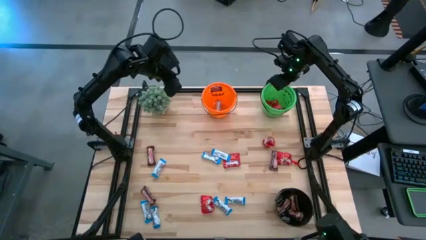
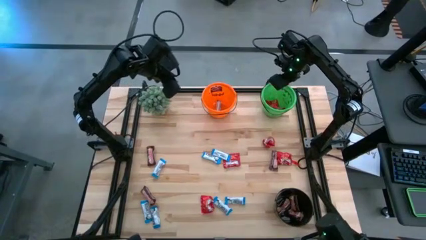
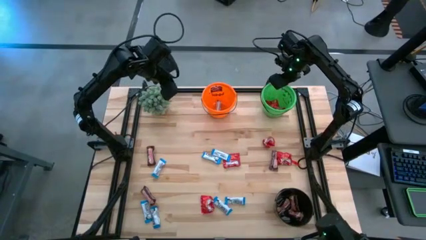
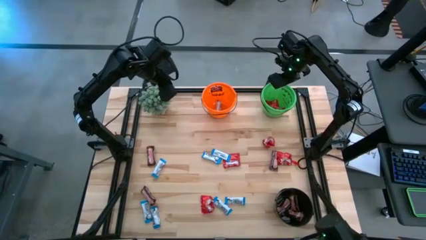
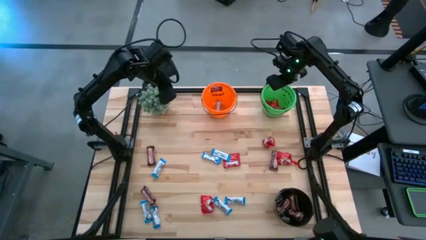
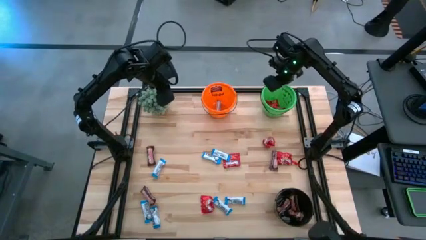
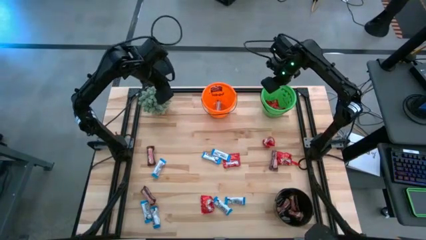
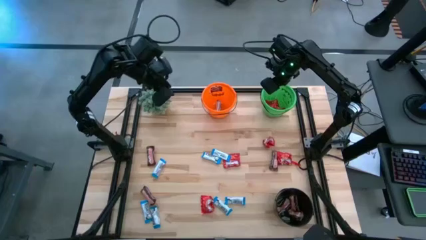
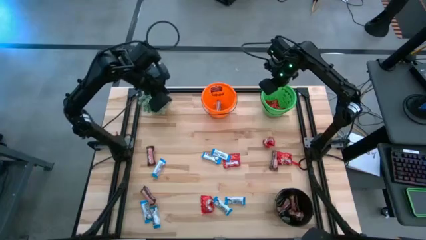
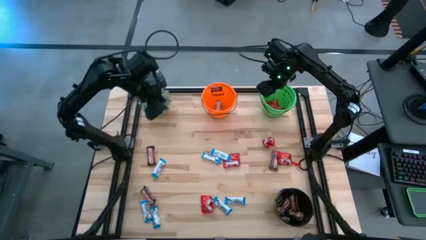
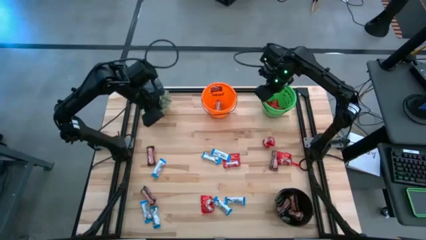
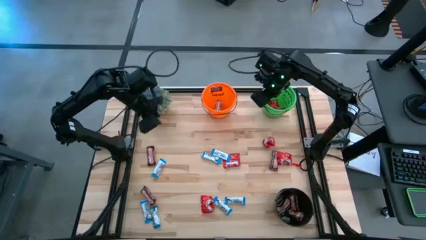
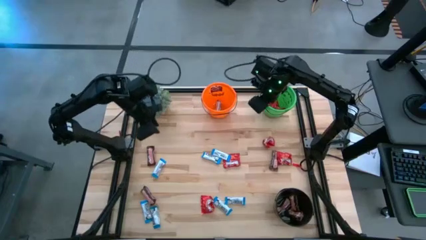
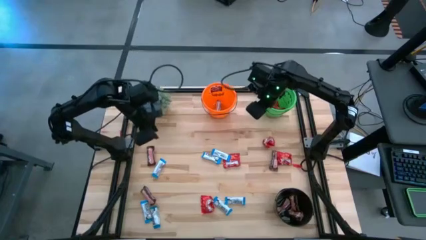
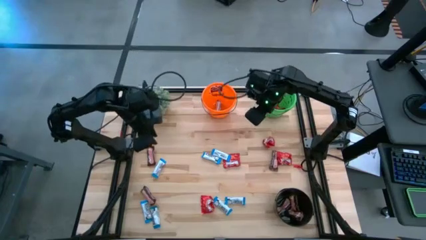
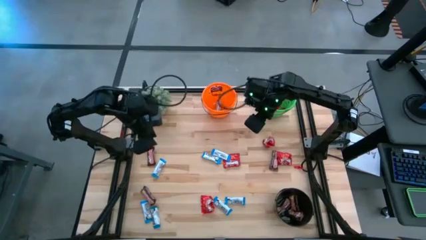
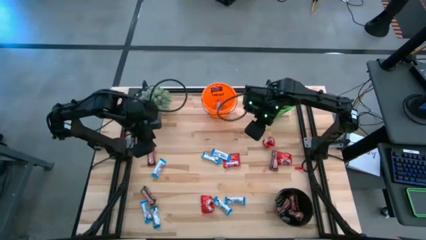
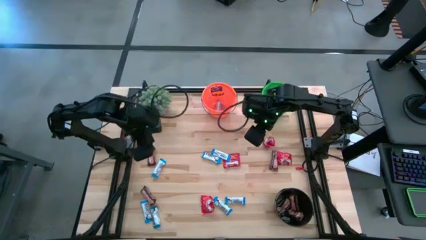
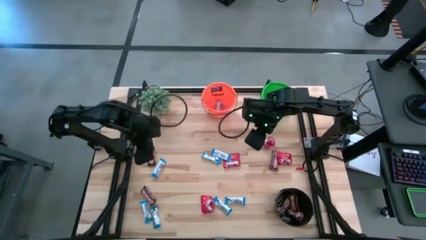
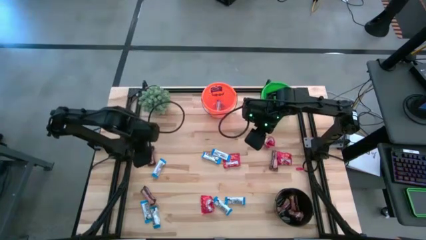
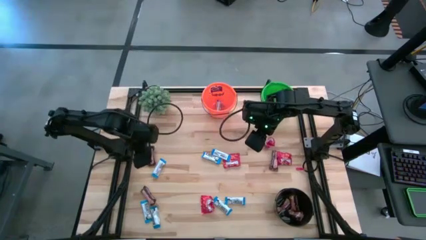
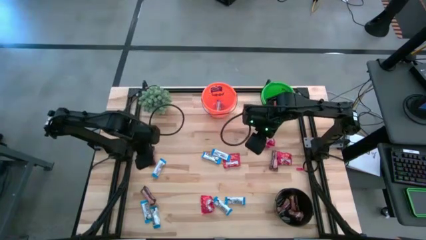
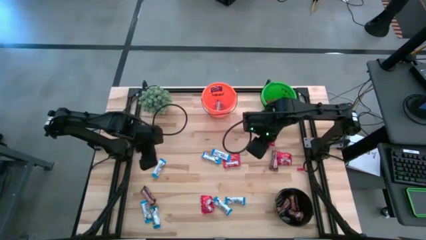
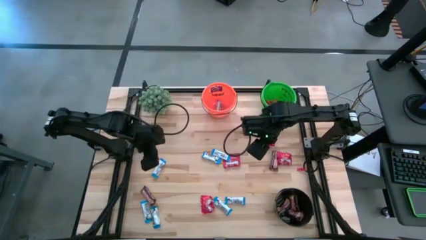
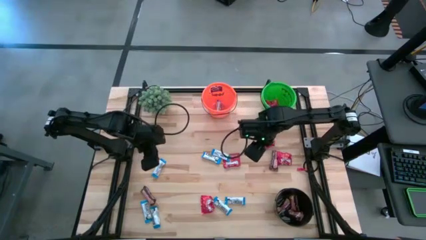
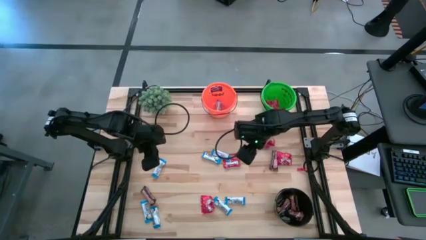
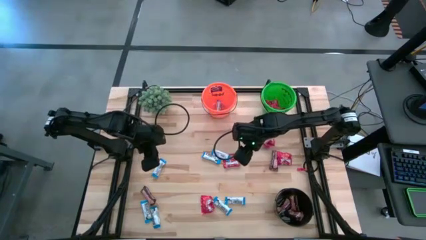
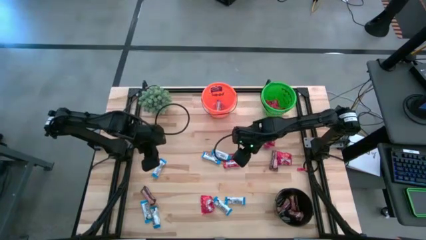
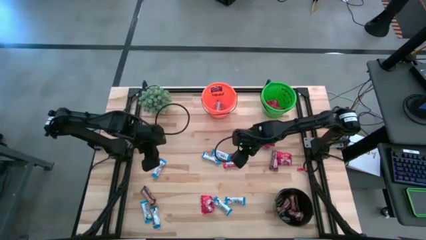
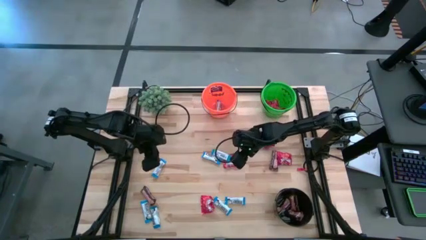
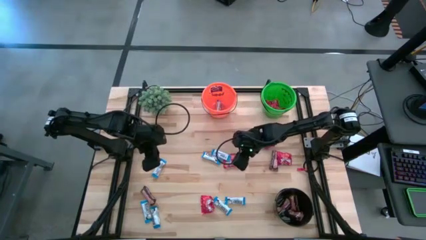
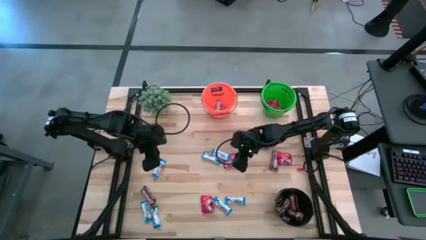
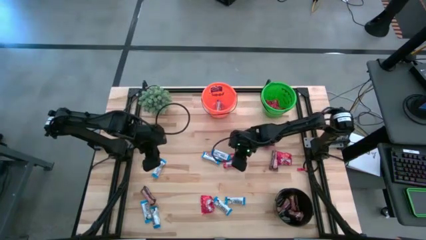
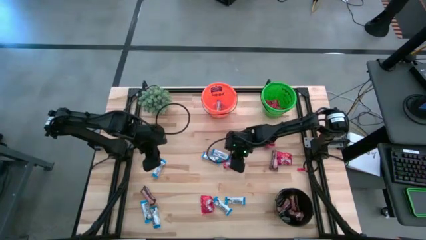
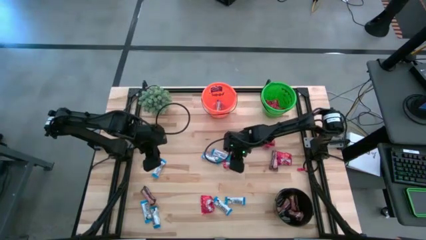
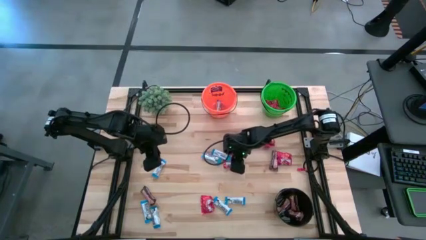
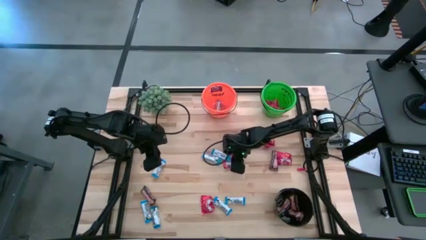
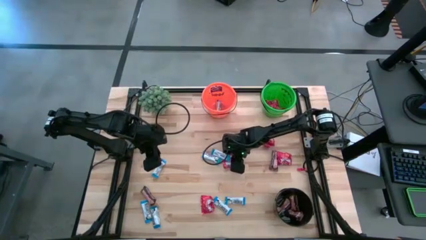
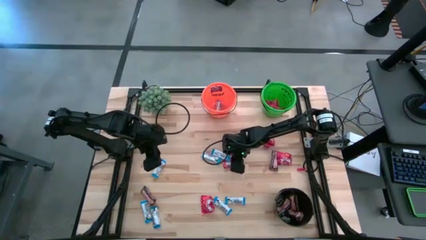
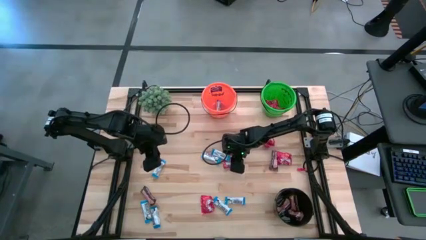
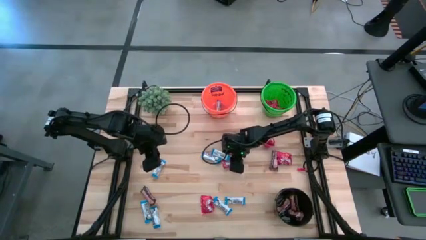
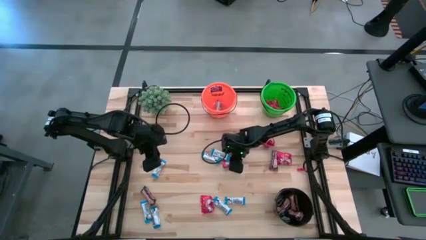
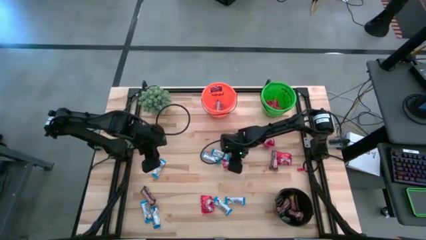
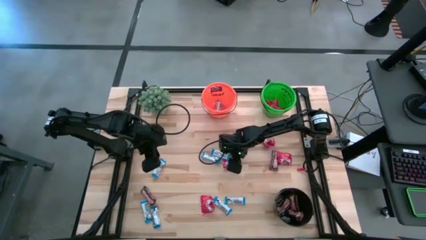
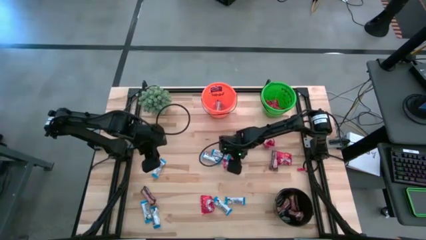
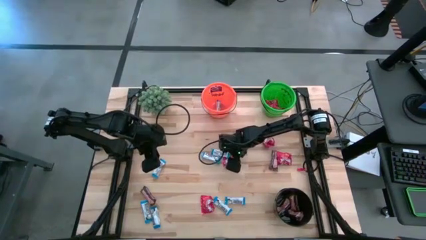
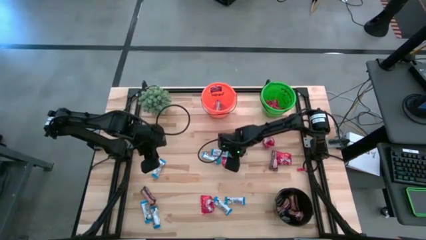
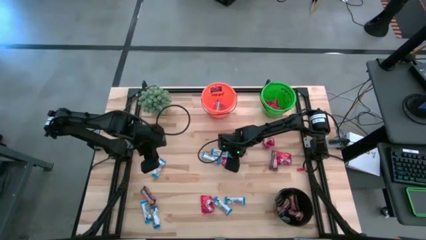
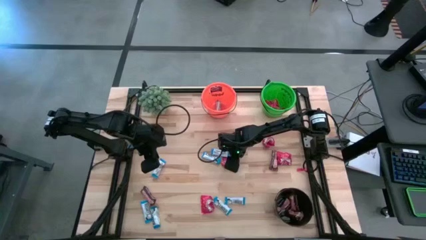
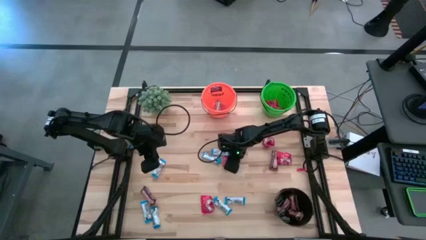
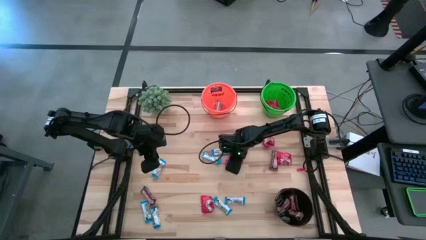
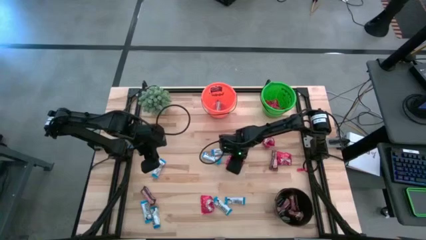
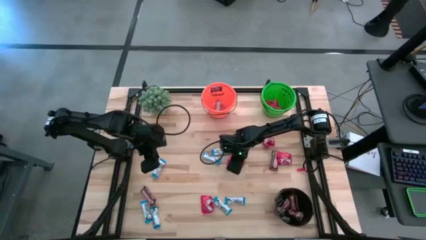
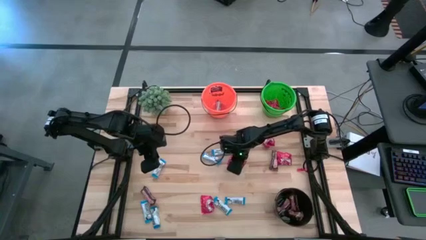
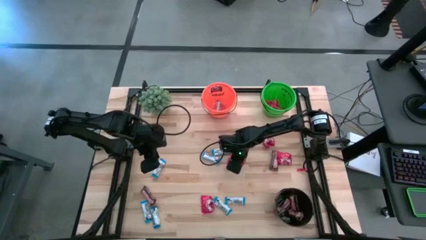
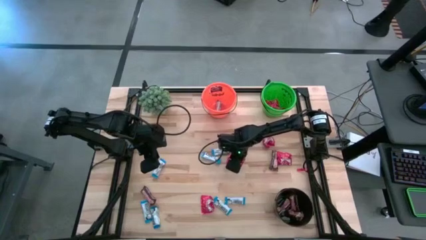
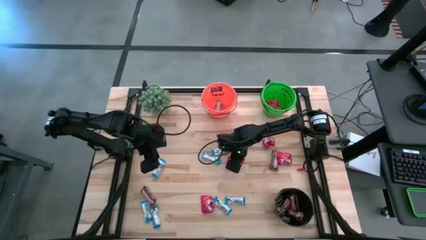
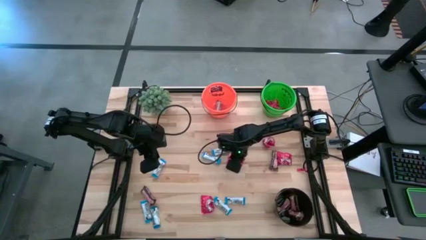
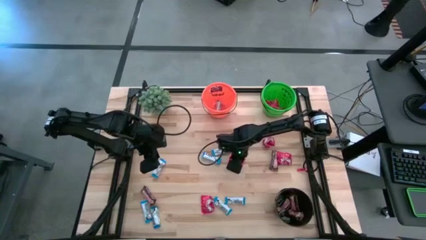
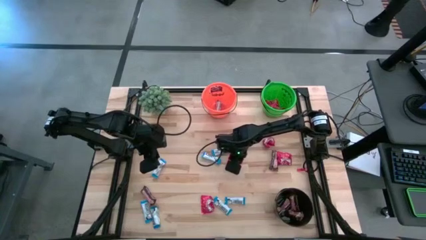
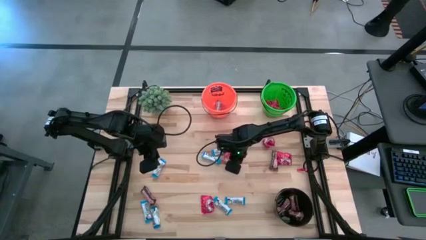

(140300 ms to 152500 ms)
Task: Organize candy in baskets
Put the red candy into the green bucket

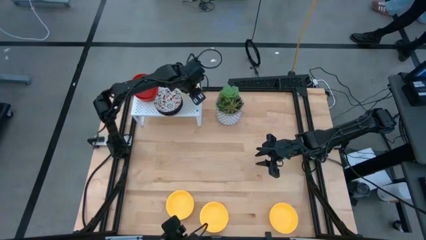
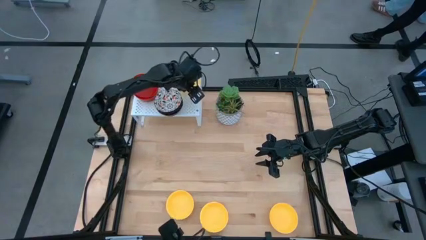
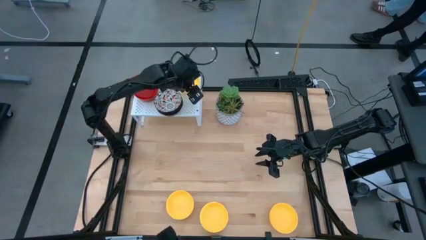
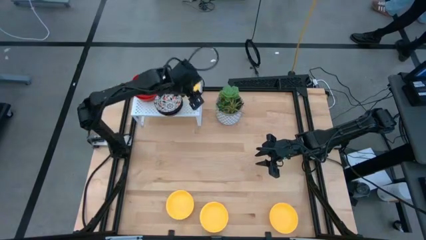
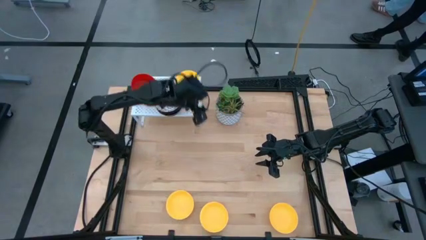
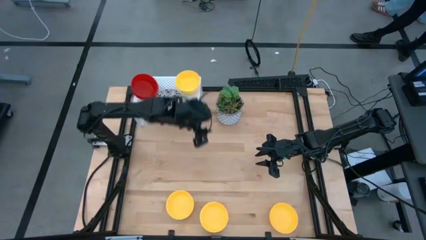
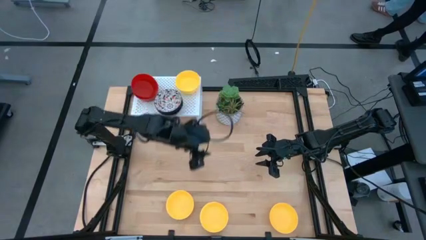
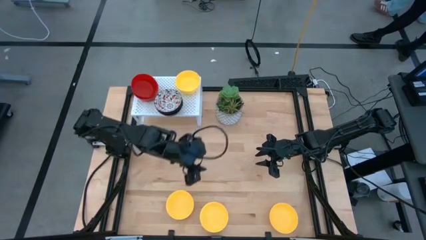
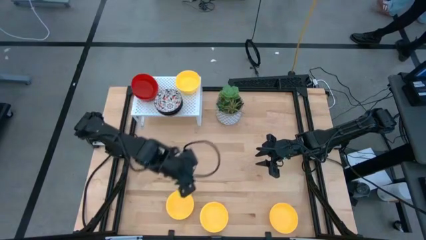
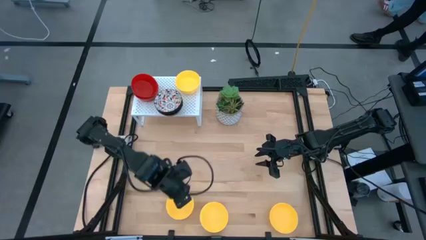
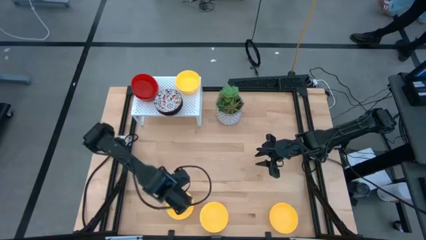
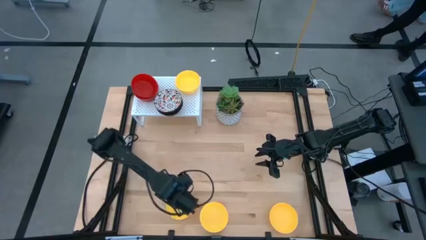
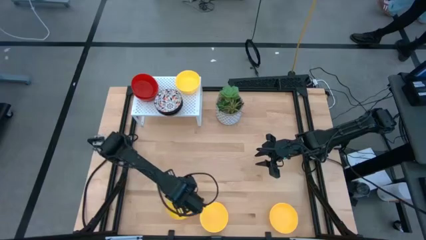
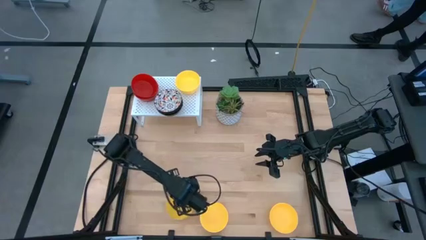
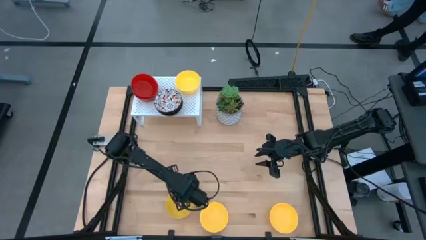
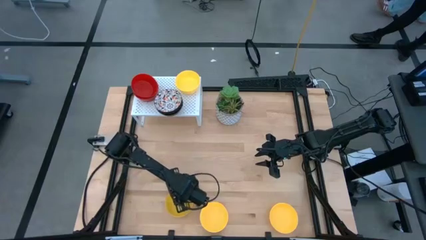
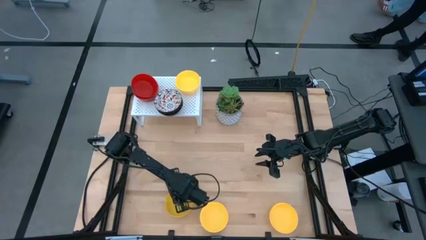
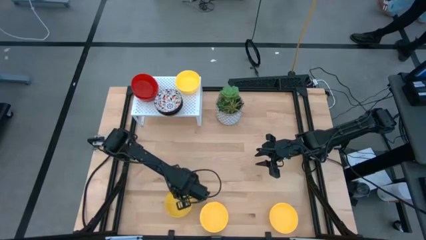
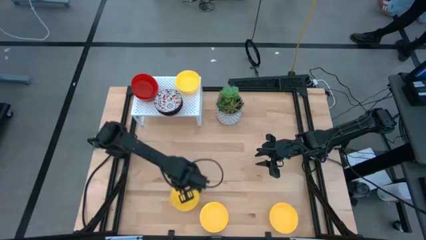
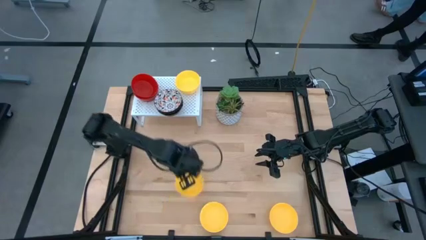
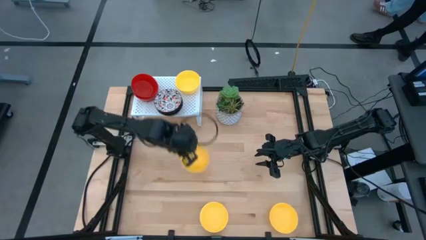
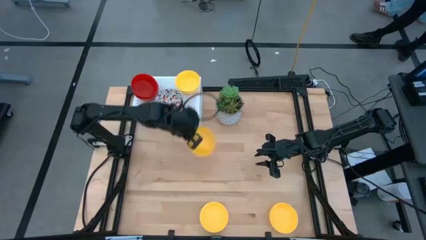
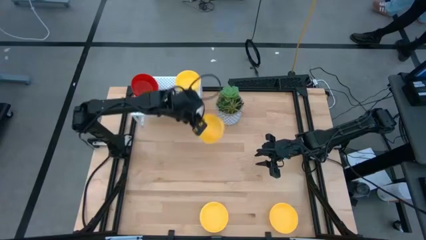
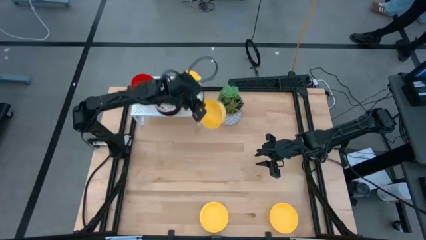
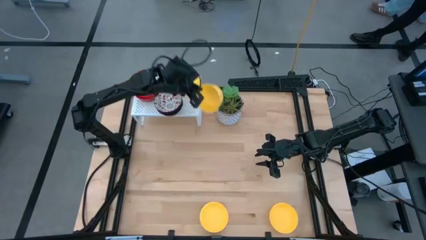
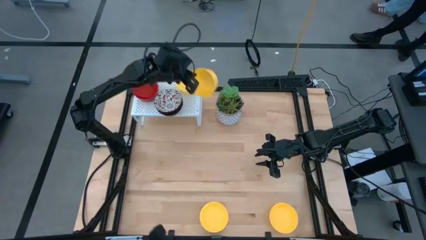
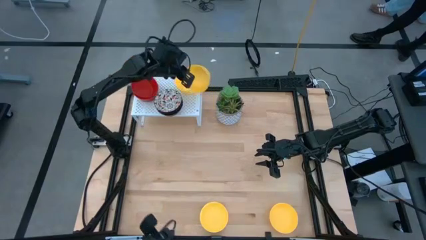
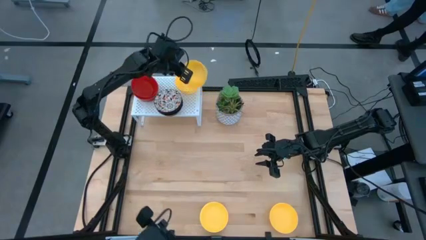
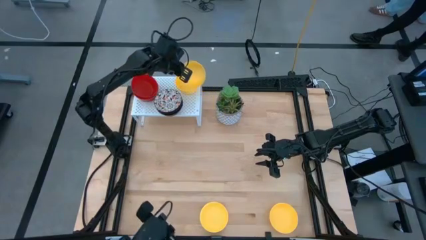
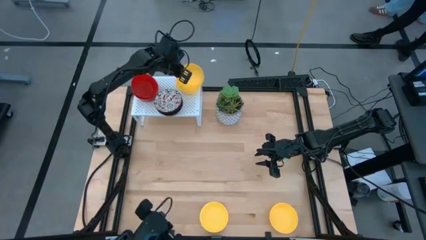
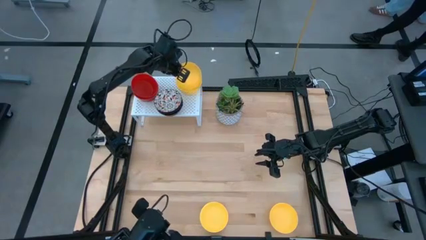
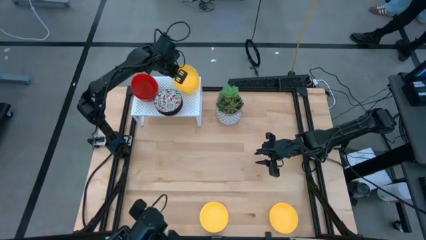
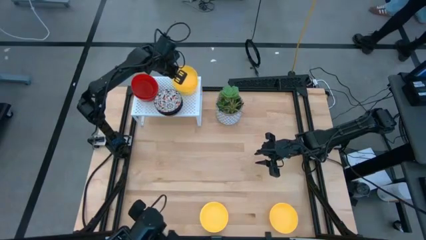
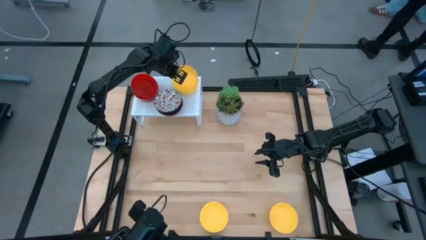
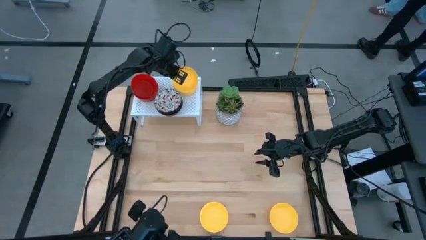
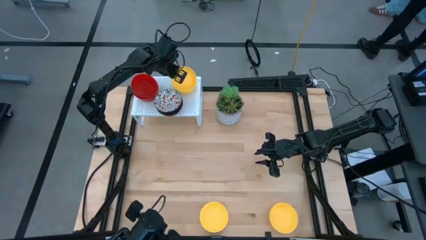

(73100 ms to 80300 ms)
Task: Pick & Place Mini bowls
Stack the yellow bowl on the yellow bowl on the shelf
